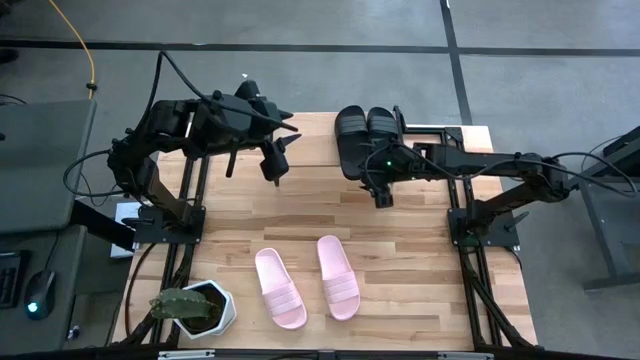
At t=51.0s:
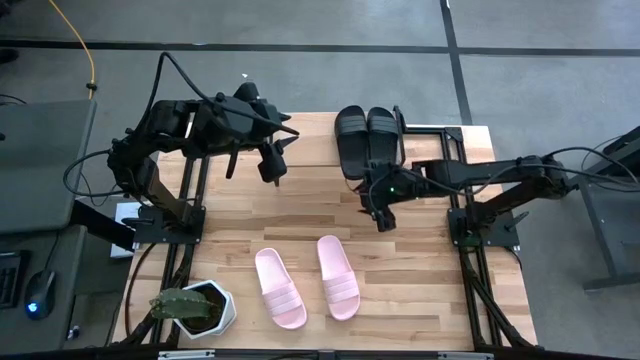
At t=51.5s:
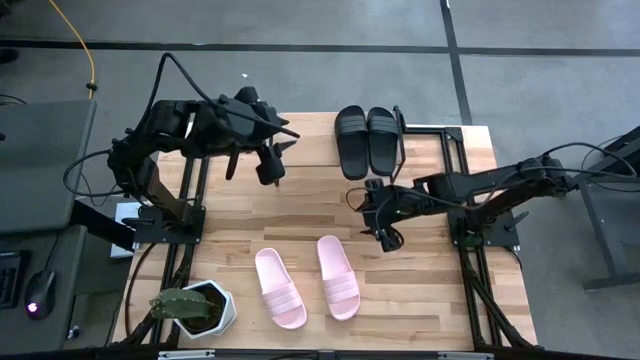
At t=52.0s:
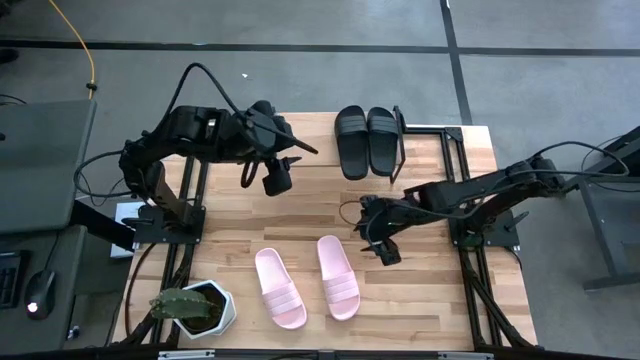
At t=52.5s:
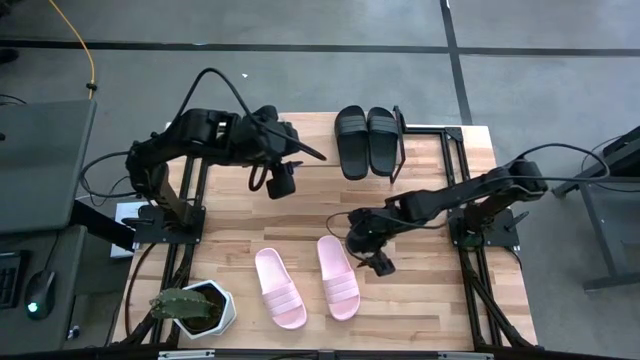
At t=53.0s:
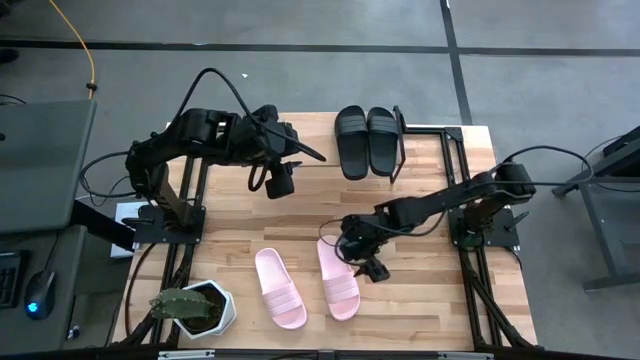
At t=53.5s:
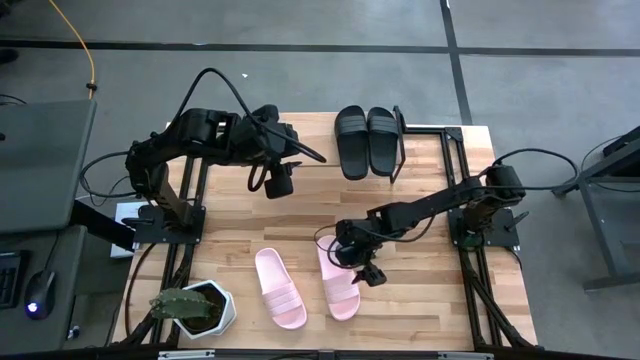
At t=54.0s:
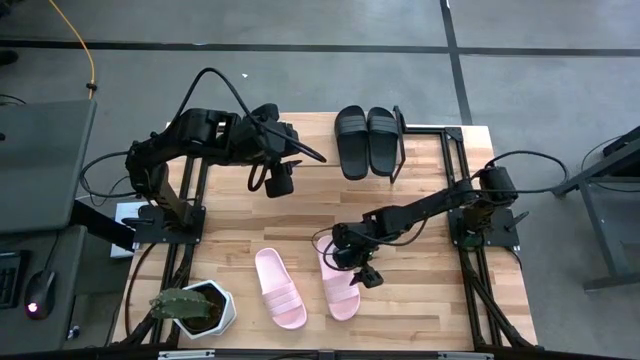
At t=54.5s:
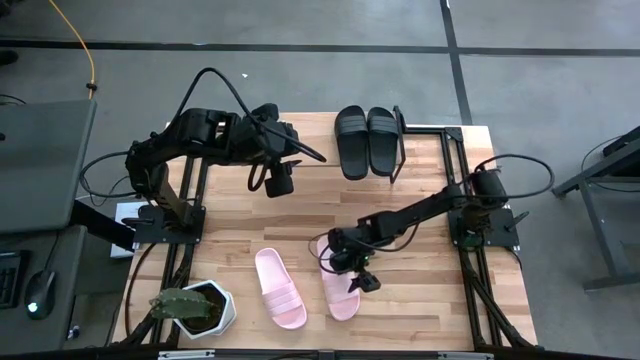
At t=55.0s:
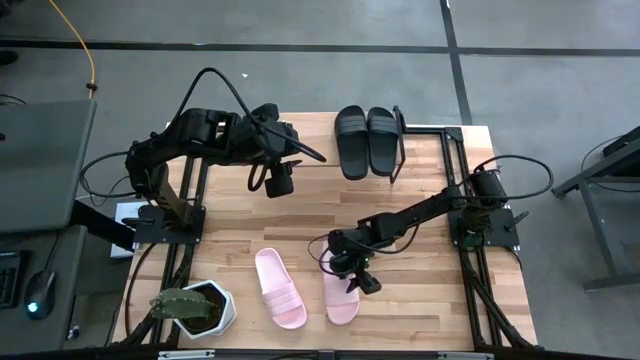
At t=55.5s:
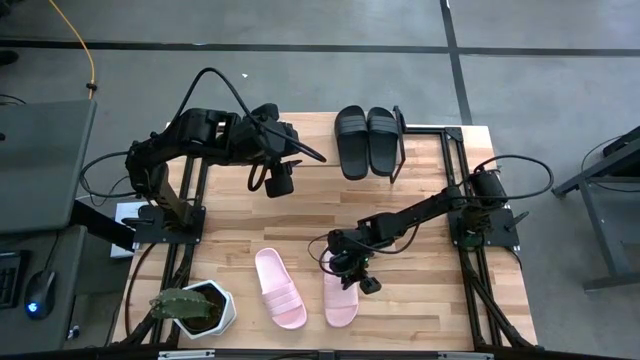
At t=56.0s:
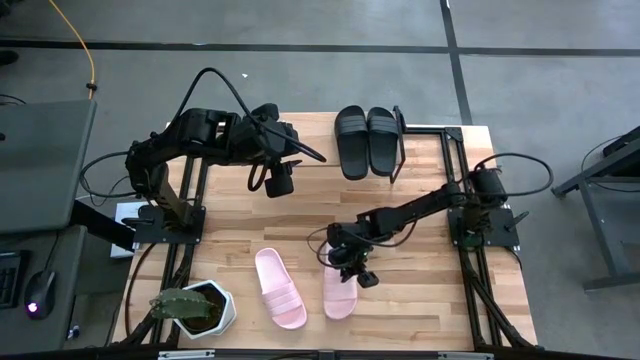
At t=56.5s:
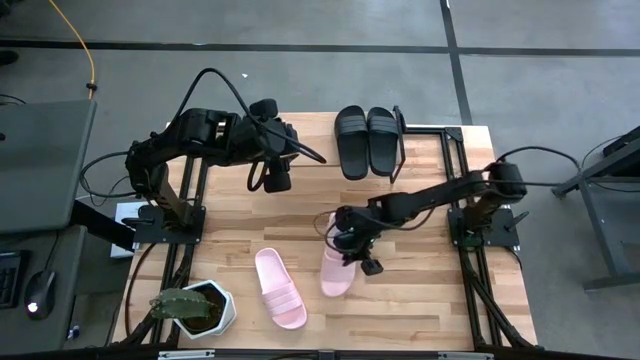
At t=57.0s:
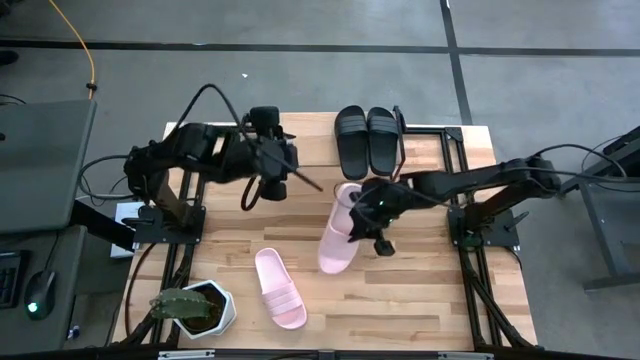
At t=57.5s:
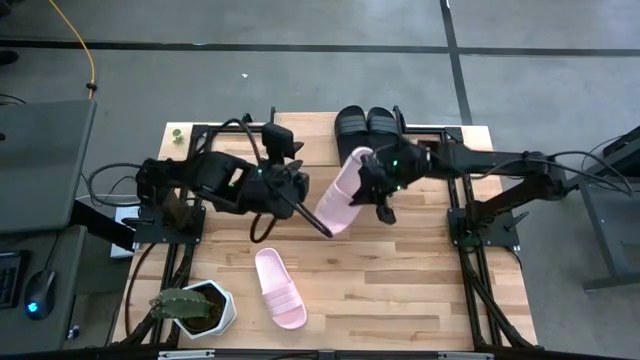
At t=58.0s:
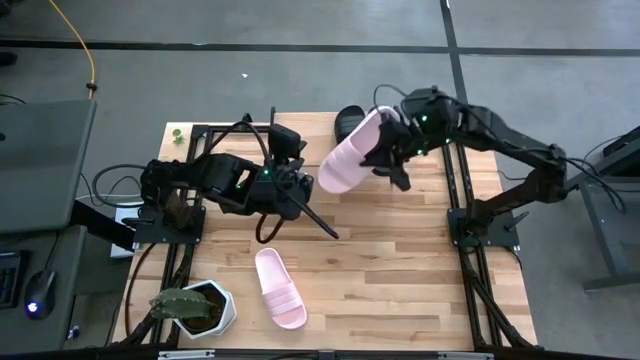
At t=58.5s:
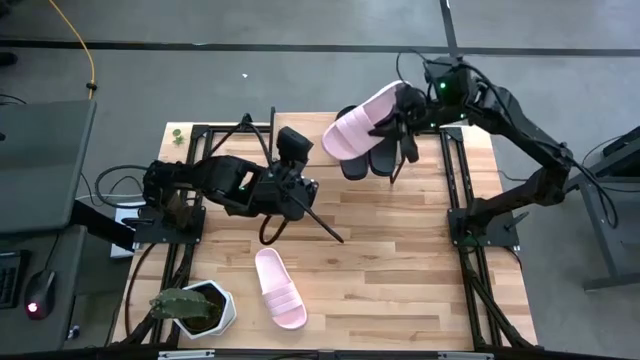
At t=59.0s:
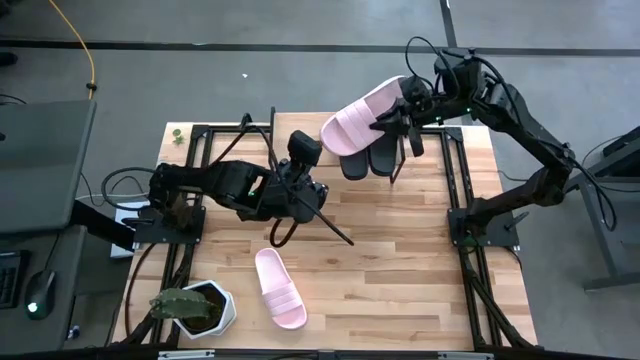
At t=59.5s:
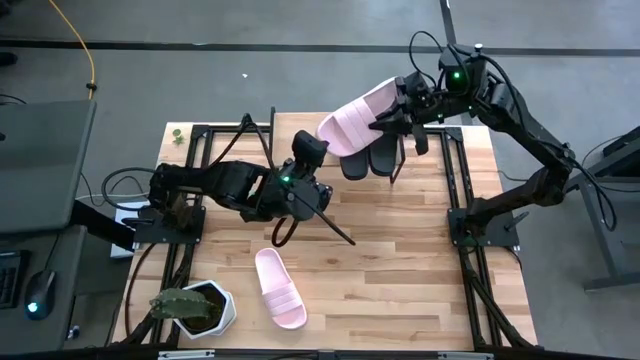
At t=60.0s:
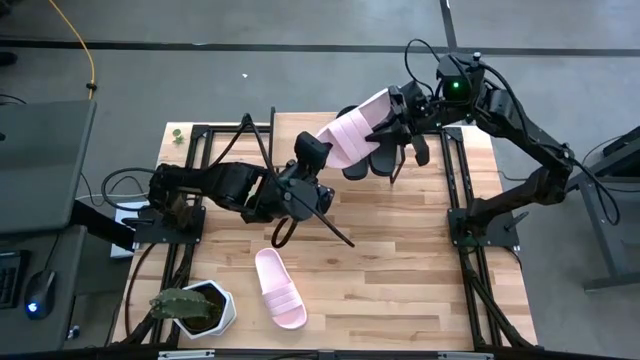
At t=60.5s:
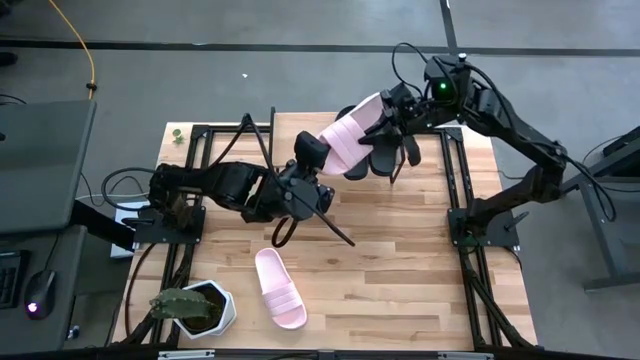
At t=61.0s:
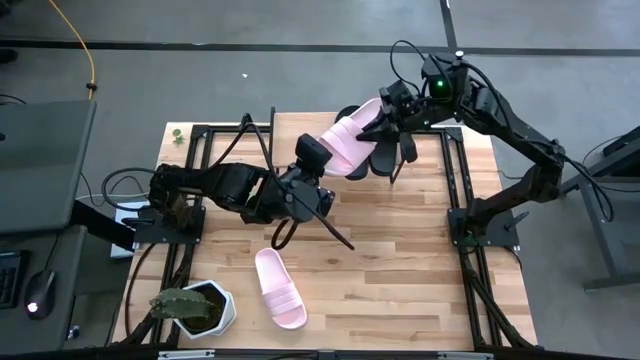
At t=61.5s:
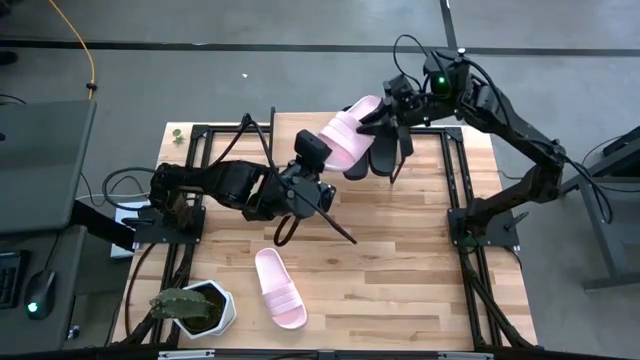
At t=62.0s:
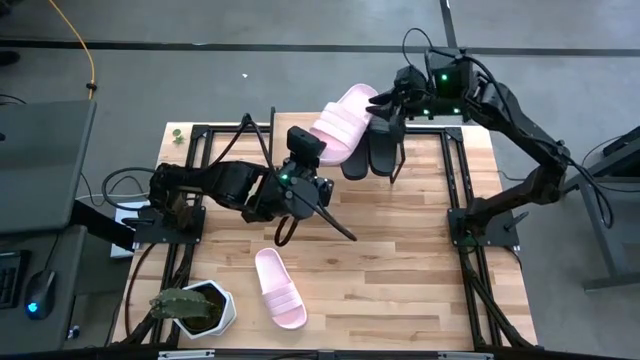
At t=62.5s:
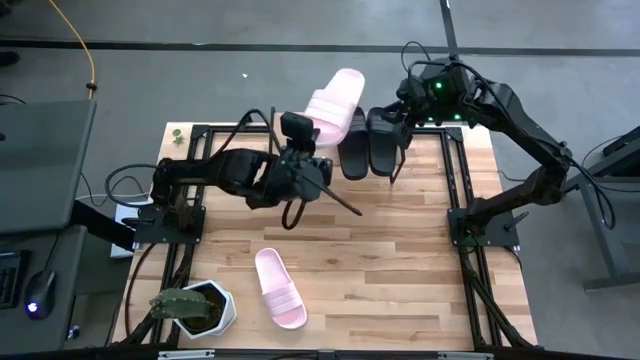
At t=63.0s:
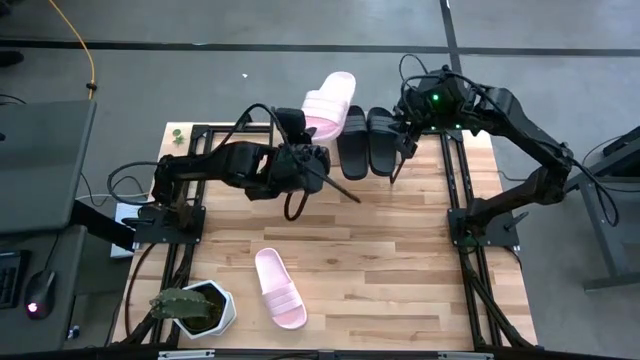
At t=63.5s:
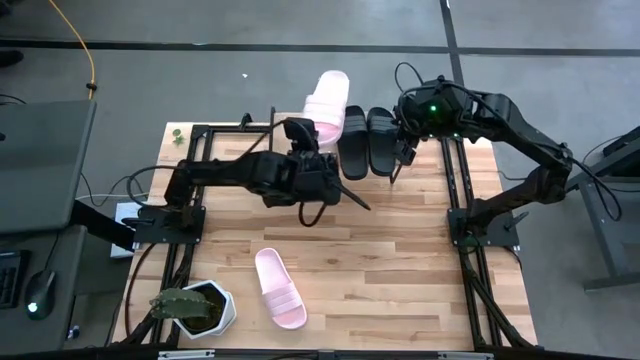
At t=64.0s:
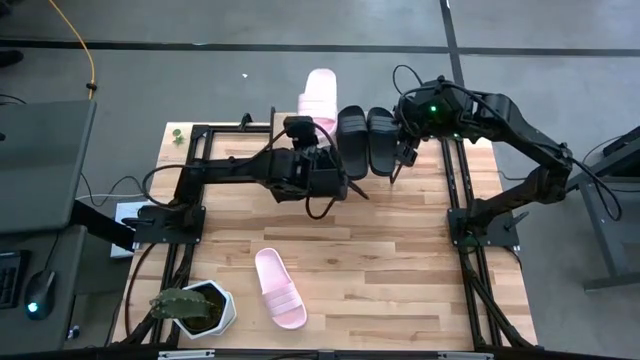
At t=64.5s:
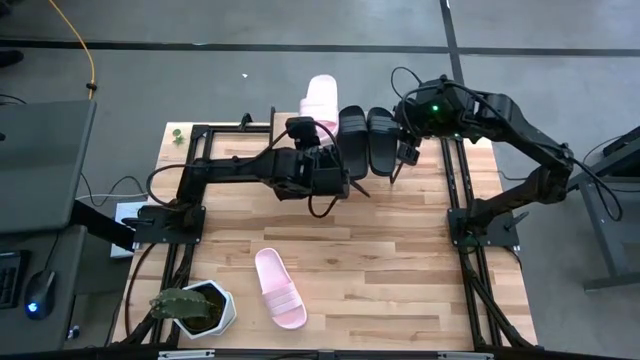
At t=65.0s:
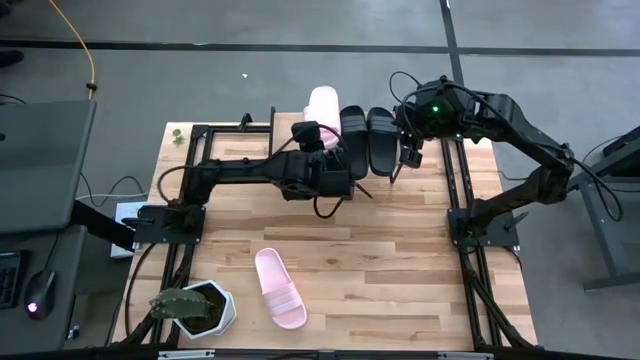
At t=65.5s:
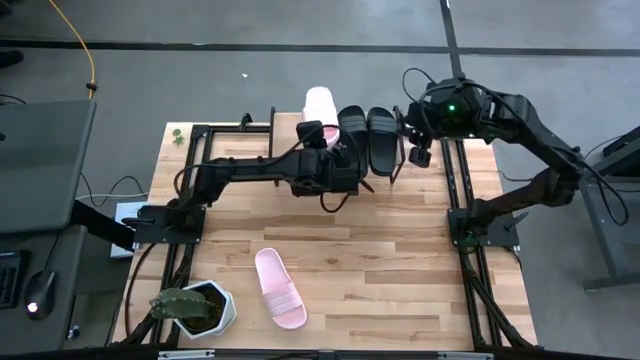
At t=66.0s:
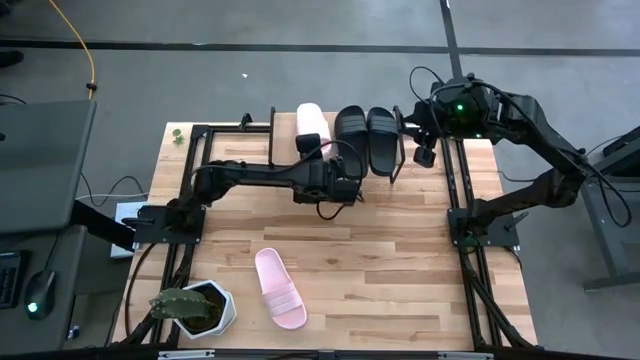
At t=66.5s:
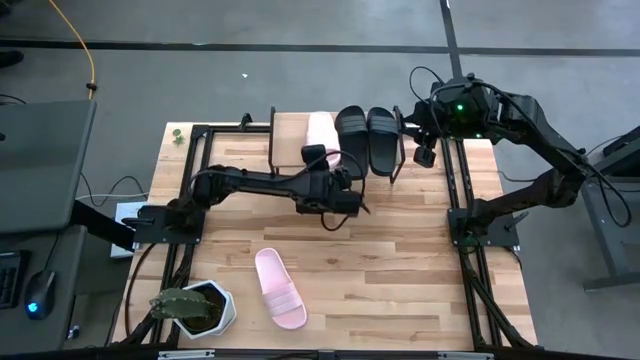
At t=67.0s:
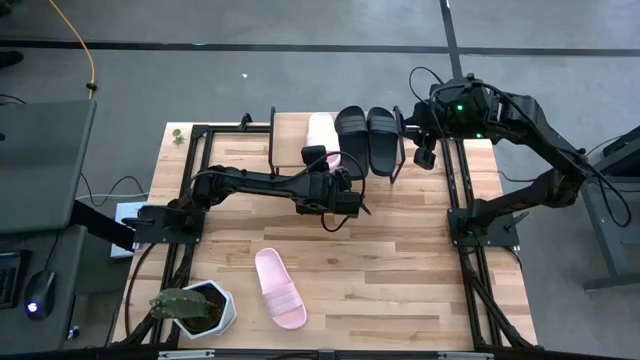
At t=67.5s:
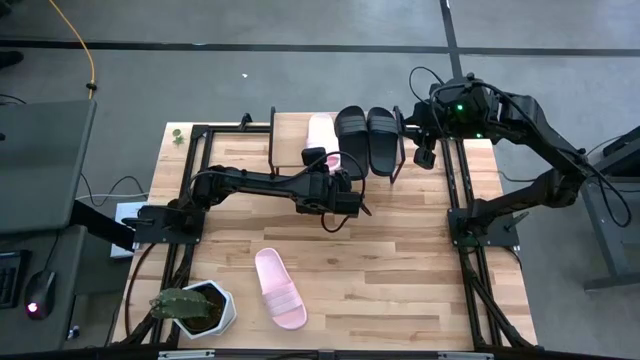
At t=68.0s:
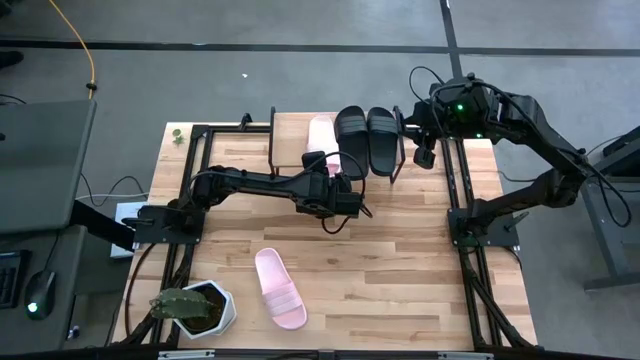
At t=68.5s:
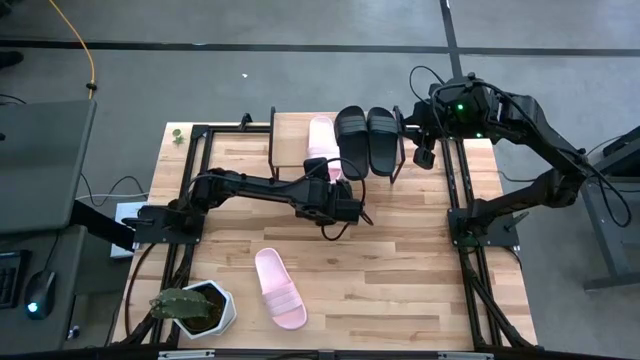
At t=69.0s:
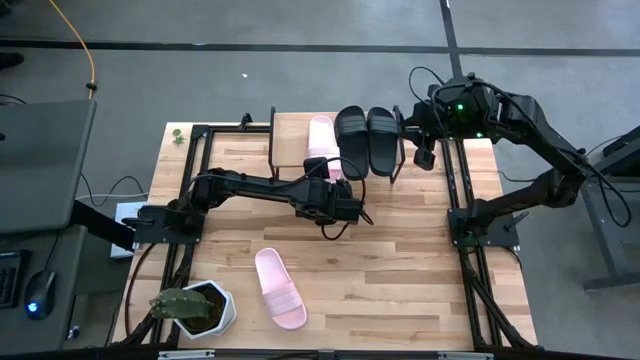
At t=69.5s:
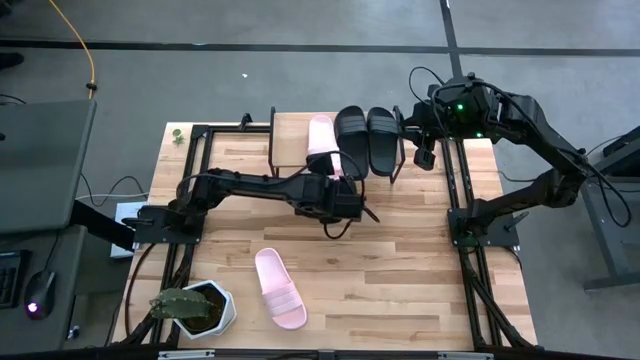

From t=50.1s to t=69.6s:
Task: Pick and place slides into the shelf
Put the right pink slide on the shelf

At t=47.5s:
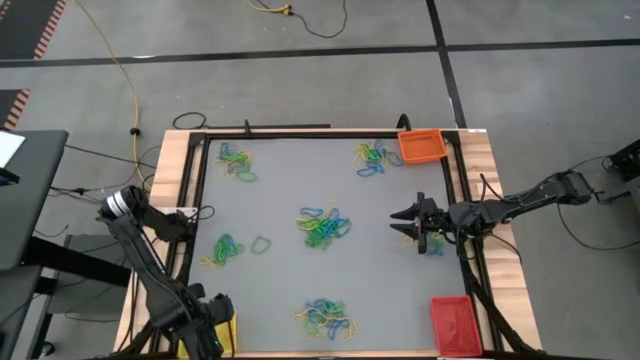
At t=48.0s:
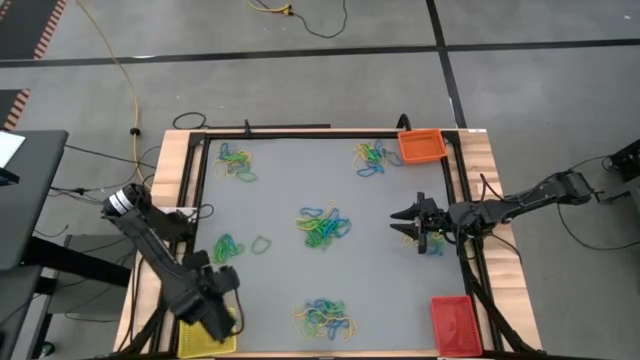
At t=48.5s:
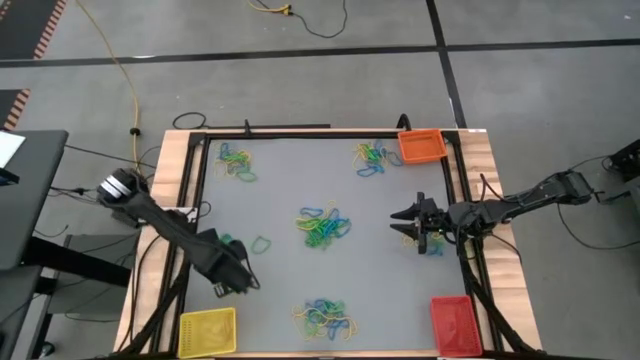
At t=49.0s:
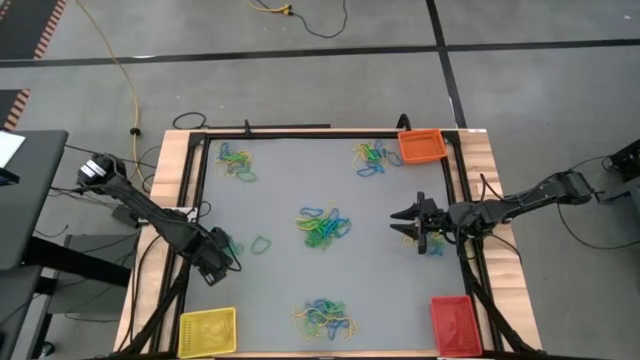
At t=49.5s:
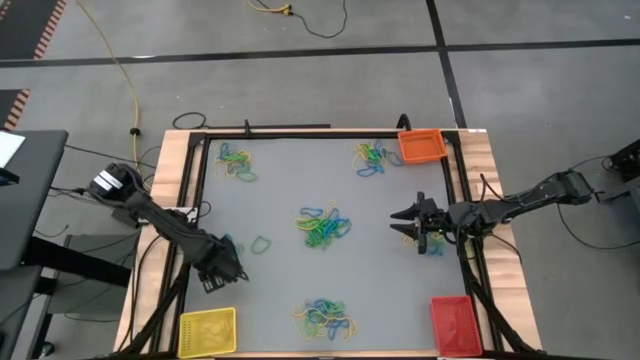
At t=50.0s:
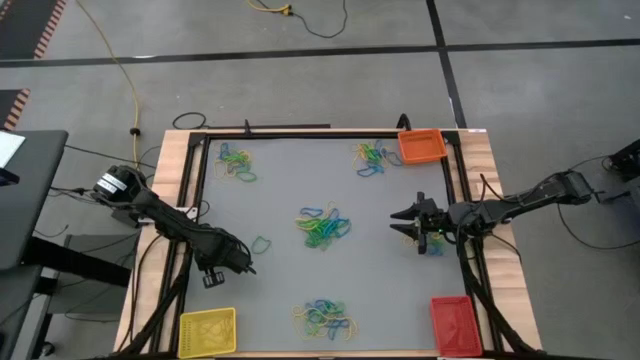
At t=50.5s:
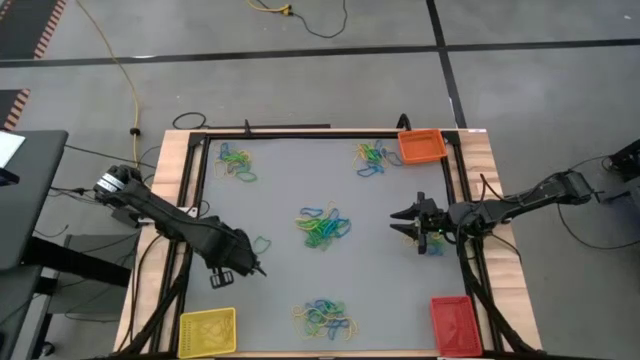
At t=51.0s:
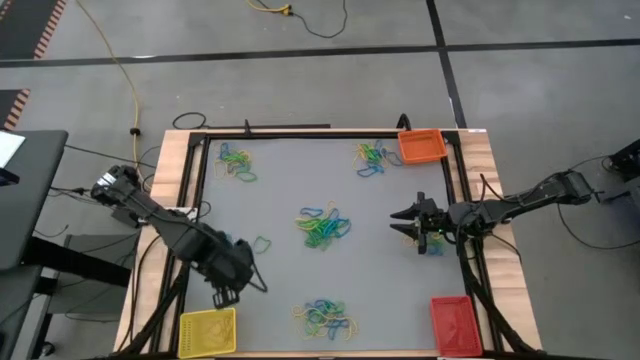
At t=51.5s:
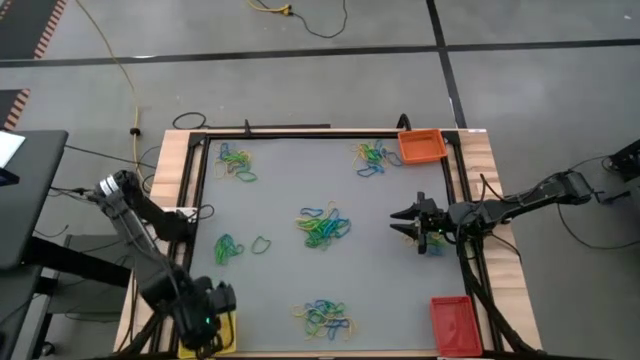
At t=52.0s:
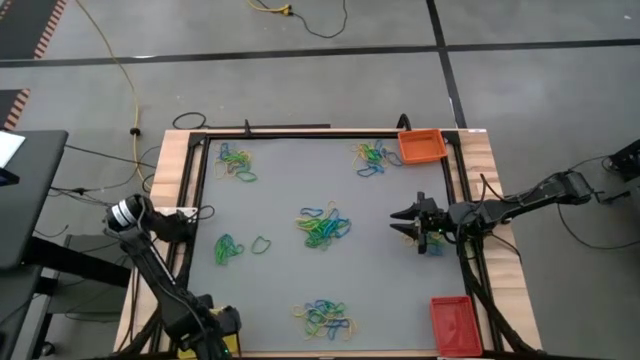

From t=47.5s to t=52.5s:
Task: Sort rubber bands into baskets
Put the yellow rubber band into the yellow bin
